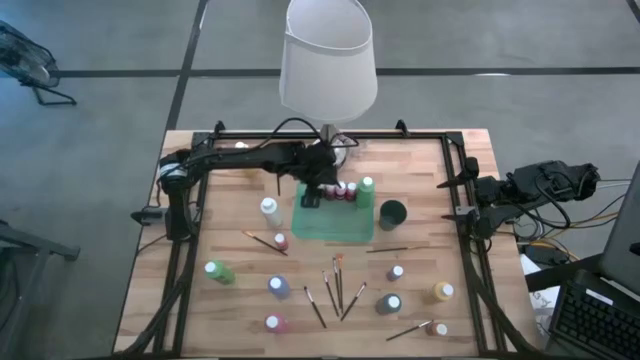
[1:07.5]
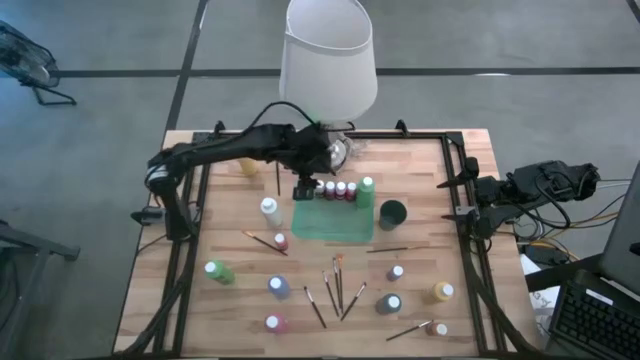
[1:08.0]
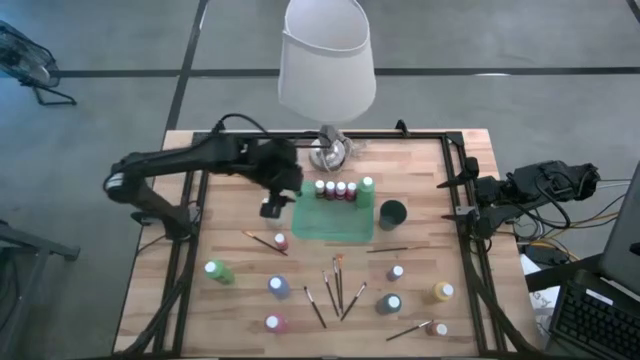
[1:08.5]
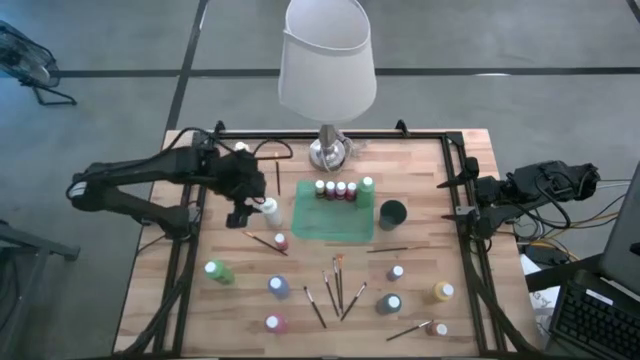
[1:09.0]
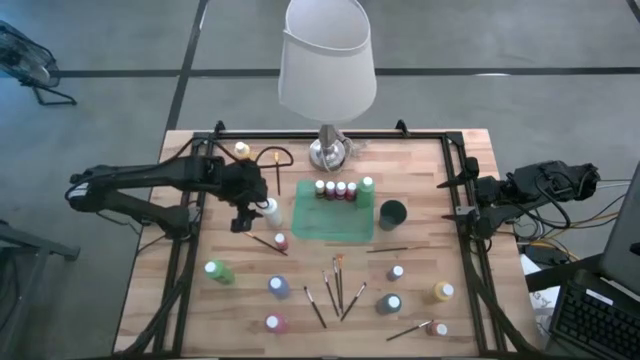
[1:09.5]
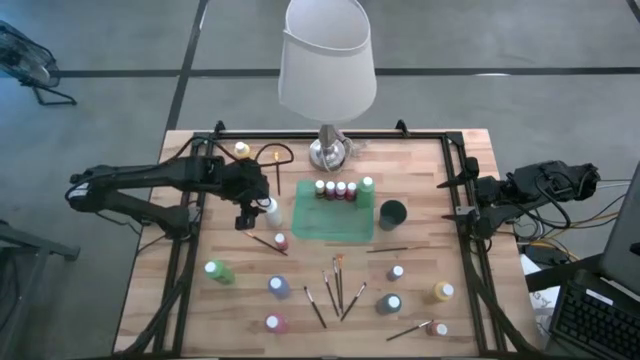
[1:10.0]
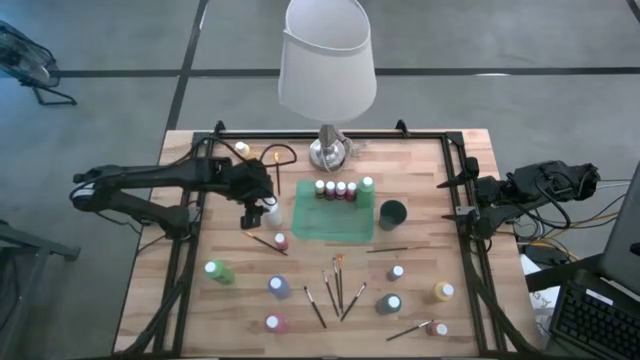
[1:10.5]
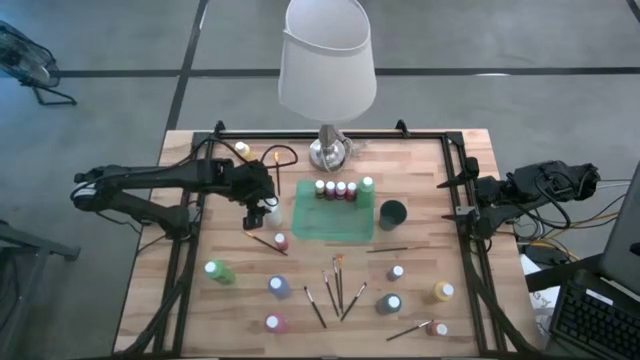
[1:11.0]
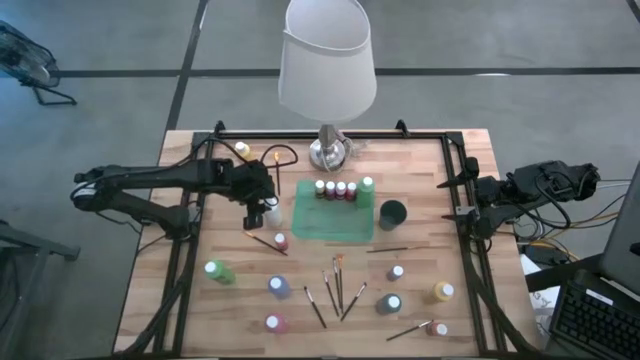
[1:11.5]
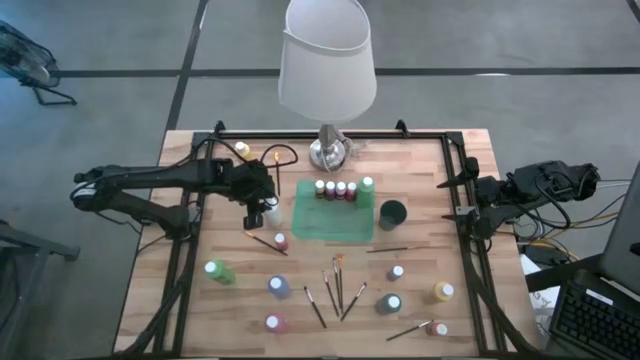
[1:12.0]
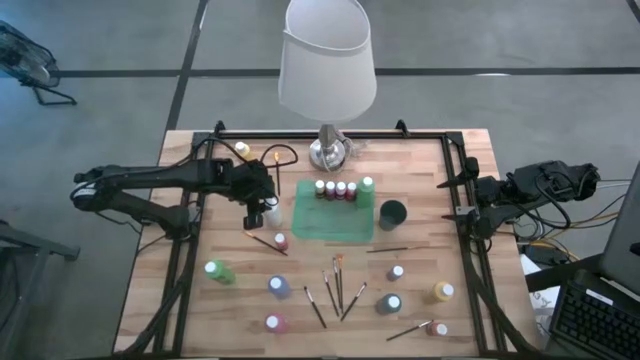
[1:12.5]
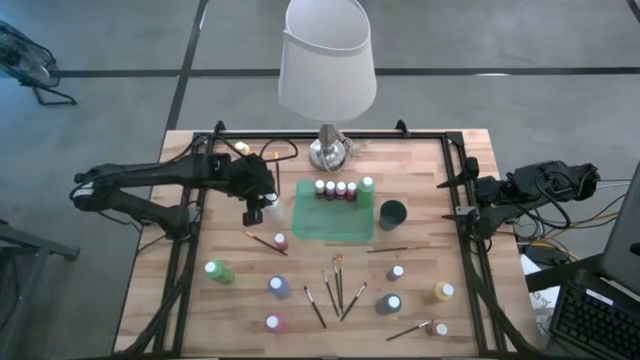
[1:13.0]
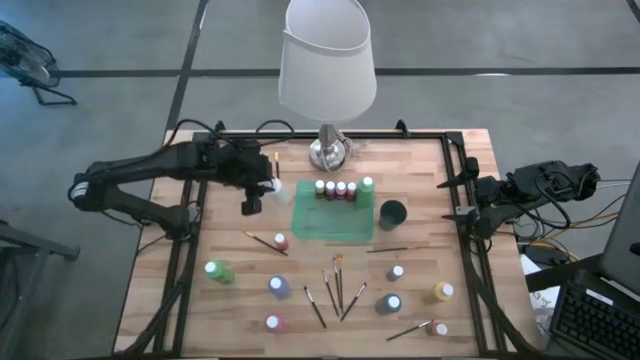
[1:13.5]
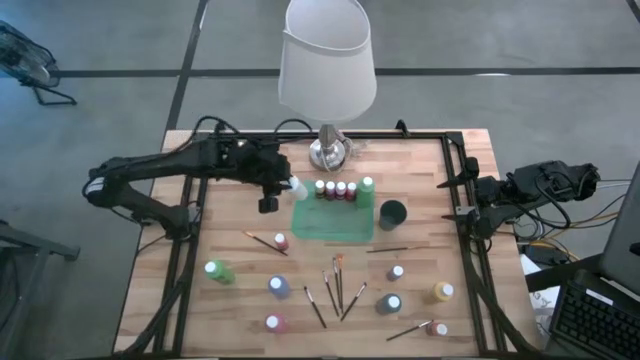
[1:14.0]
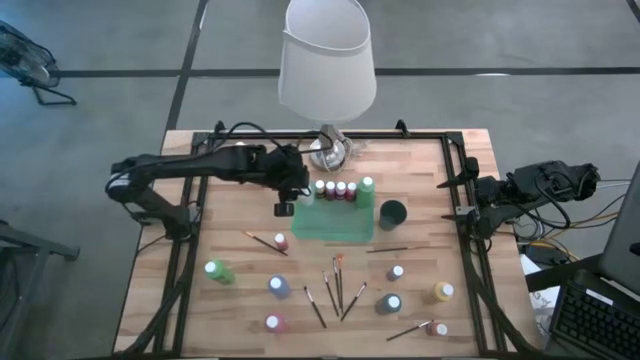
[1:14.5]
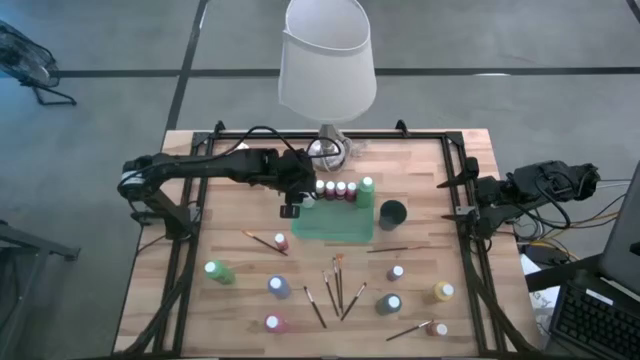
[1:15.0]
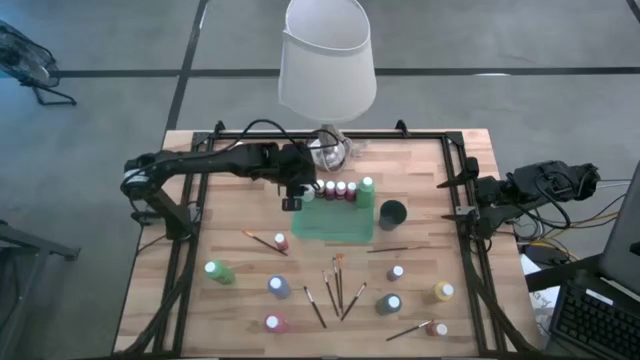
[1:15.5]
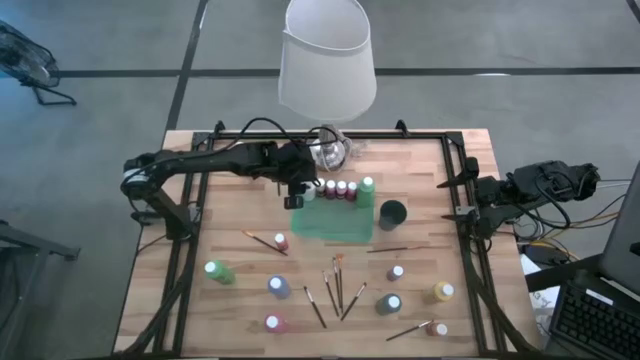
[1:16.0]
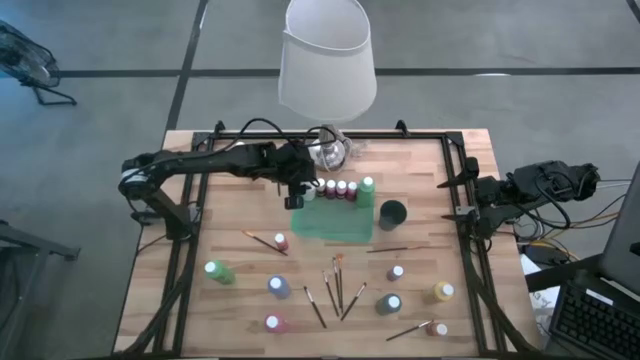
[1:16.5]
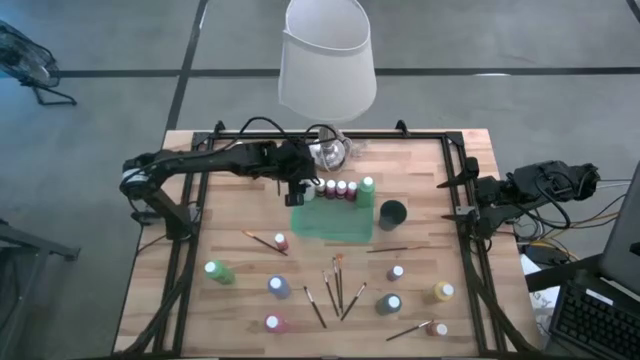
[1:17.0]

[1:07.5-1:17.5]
Task: Pick & Place Paint Supplies
Put the white paint bottle into the green bin

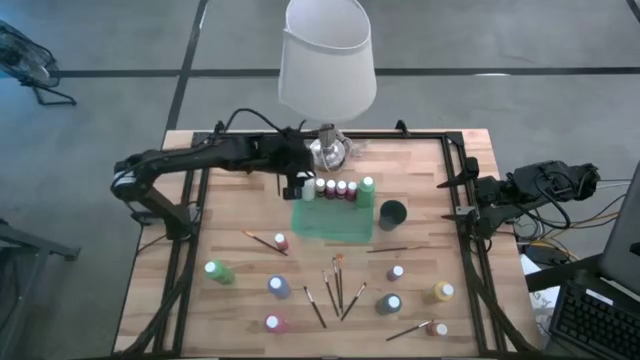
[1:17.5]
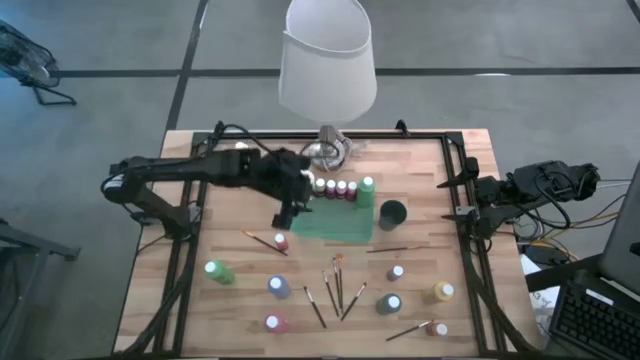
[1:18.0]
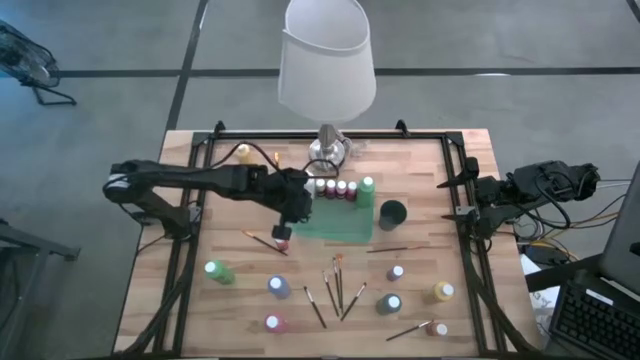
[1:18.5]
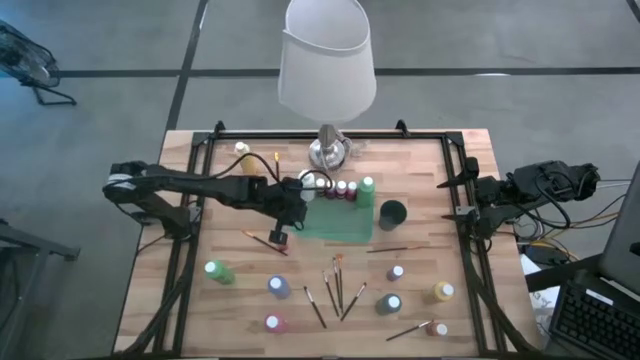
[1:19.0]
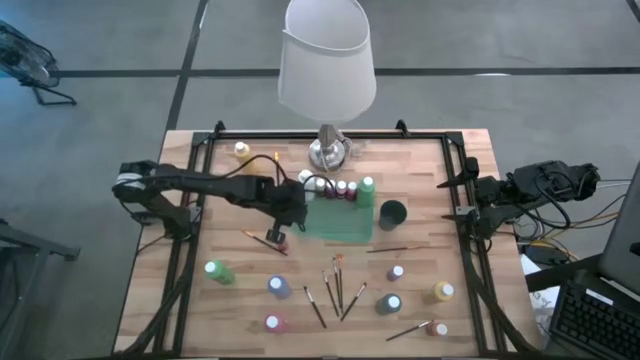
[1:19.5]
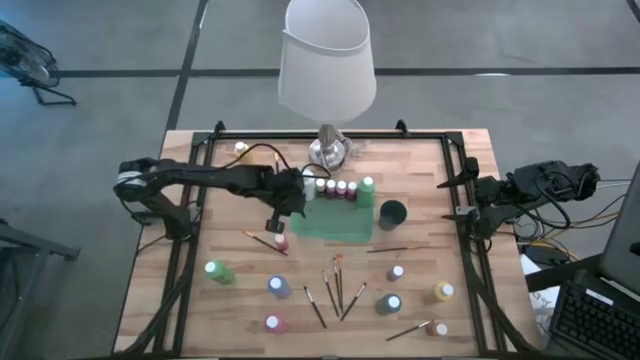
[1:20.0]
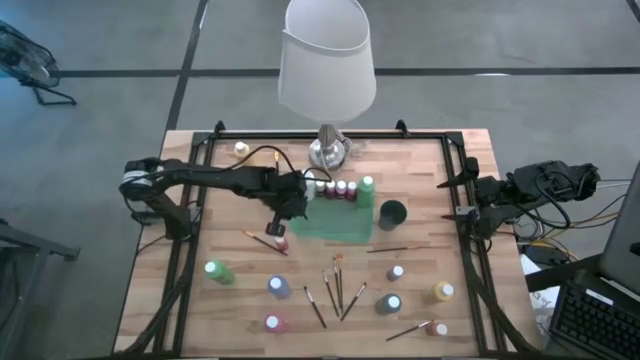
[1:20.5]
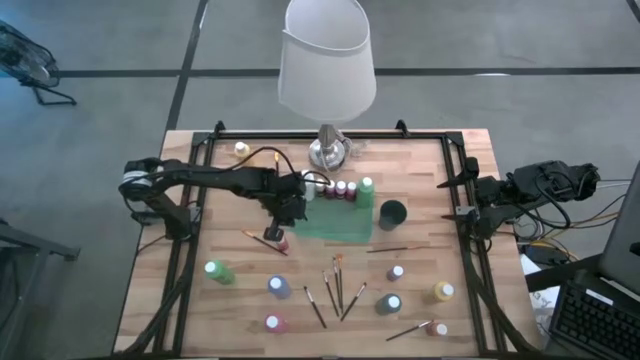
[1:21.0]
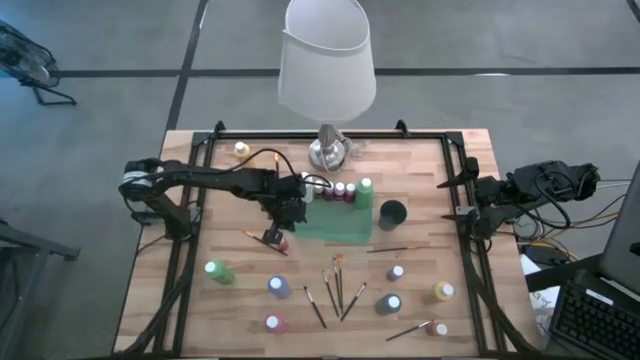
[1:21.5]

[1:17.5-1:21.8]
Adjust the green bin

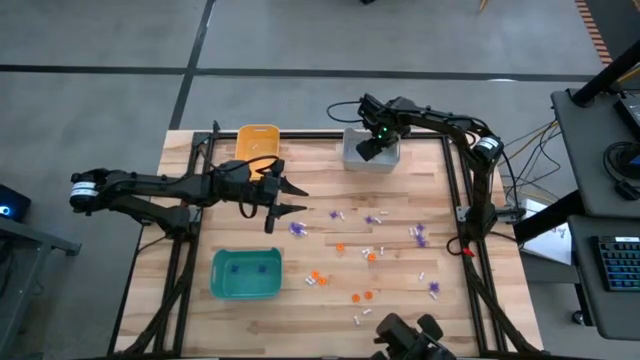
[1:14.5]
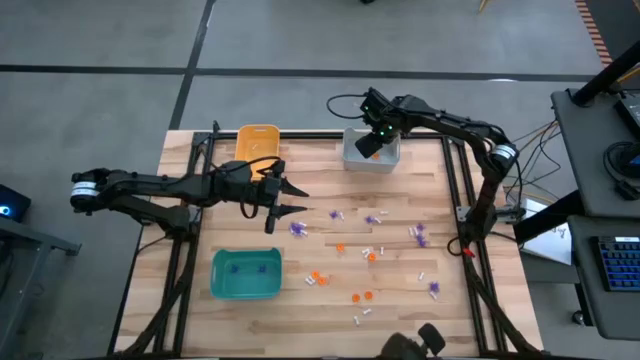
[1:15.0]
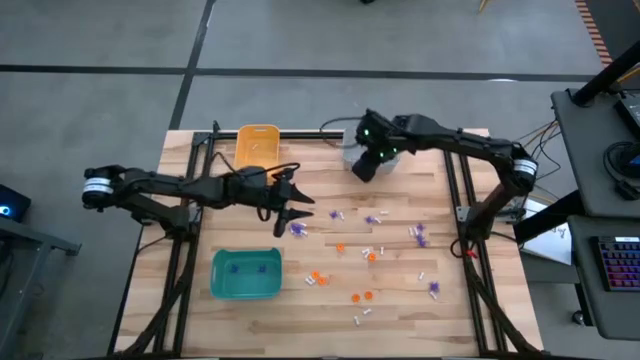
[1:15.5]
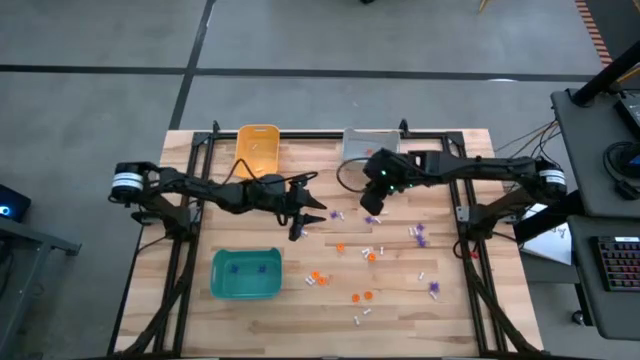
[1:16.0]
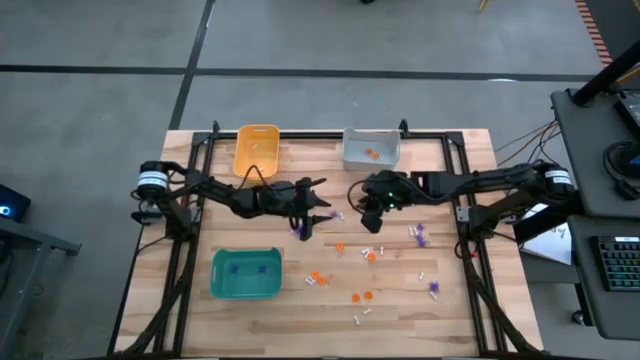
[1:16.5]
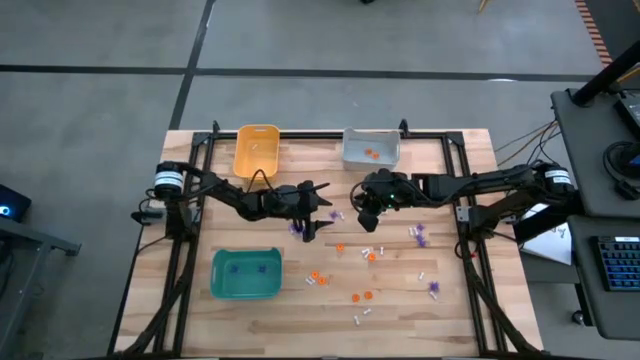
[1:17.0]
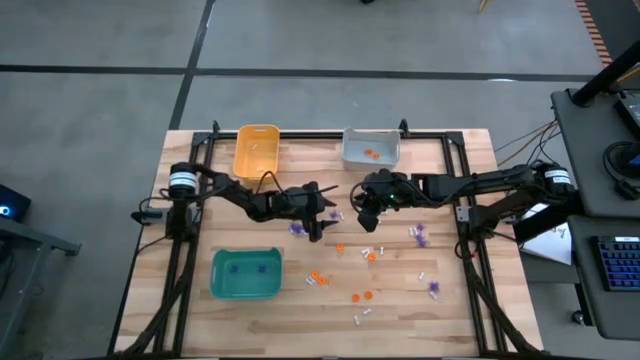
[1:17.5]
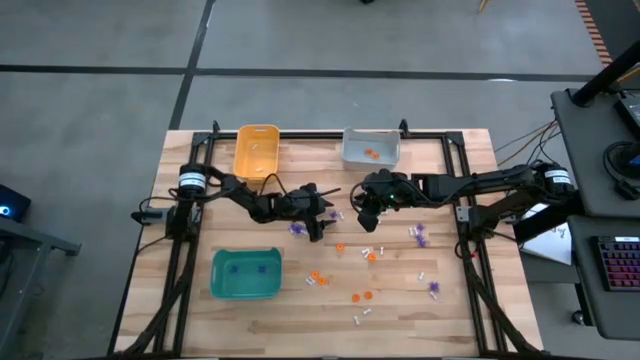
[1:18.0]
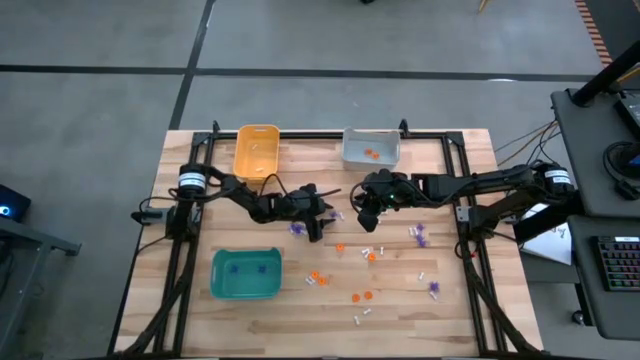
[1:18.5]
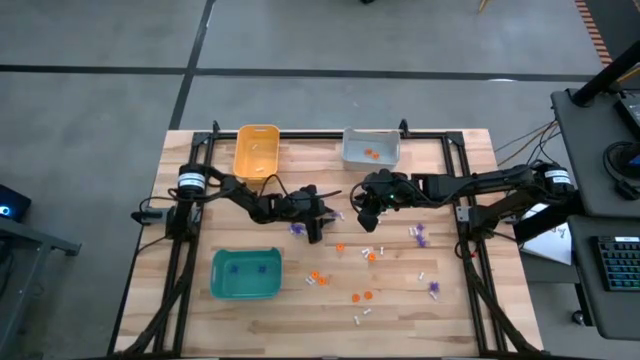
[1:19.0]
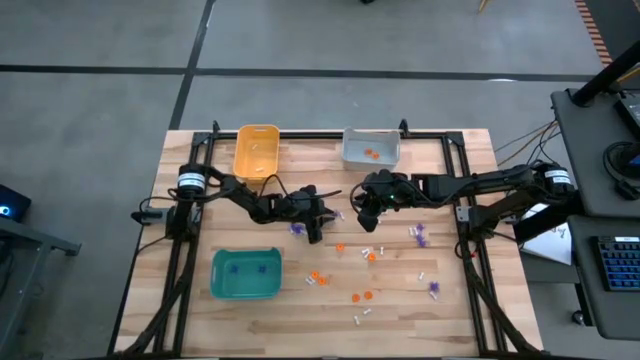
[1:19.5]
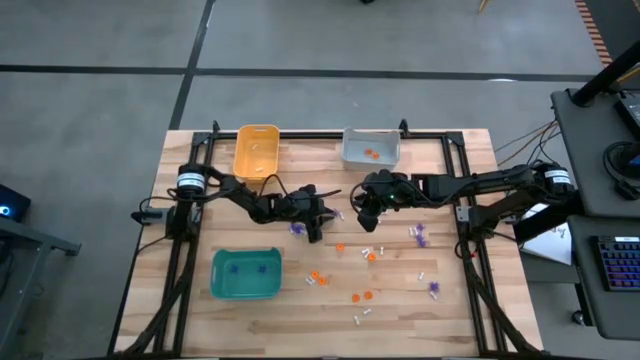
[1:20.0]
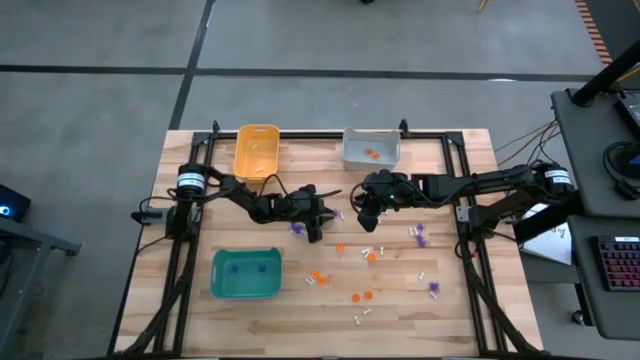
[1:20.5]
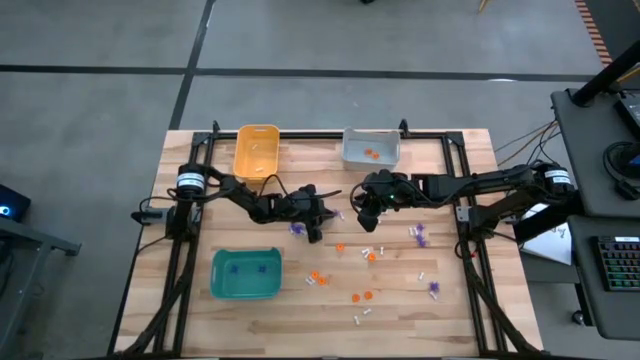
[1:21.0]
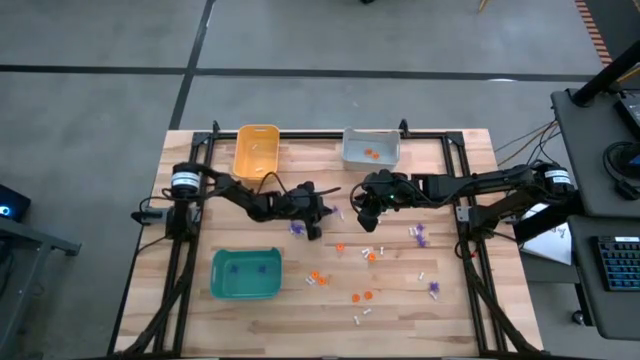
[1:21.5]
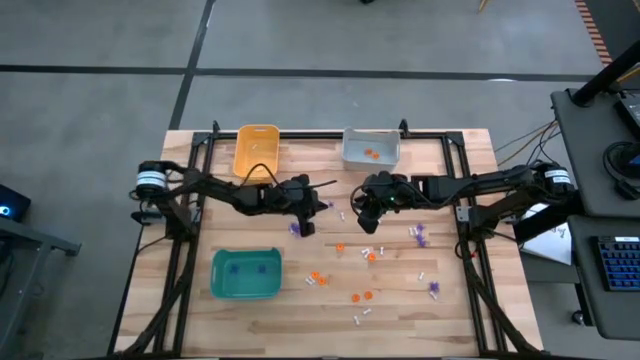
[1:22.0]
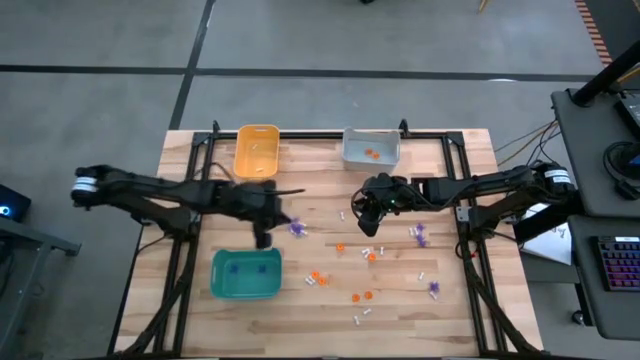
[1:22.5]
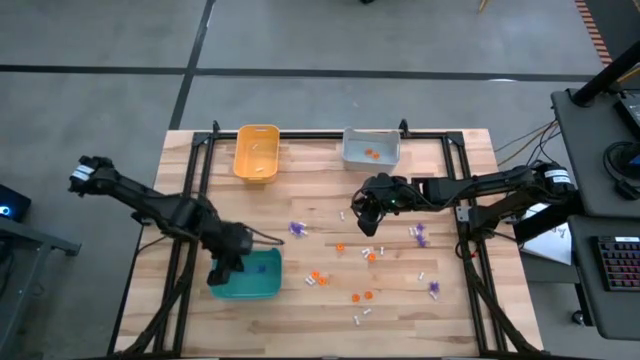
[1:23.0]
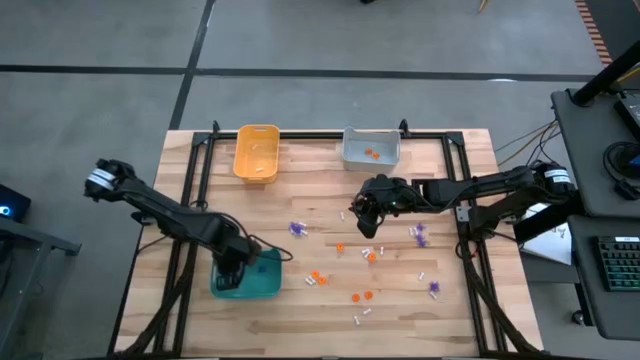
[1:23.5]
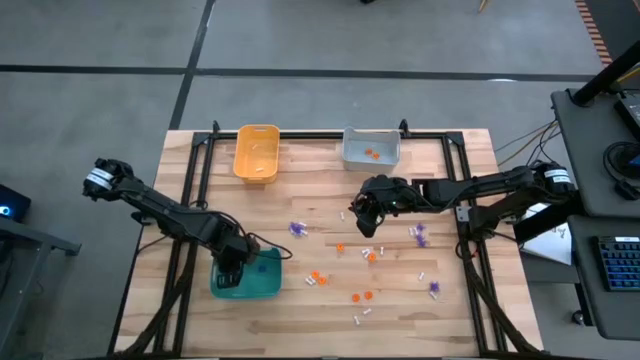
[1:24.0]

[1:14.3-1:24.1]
Task: Sort Halloween decoration
Put the blue spider toy into the green bin
